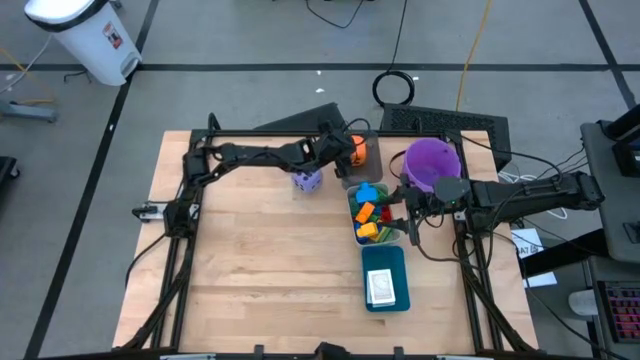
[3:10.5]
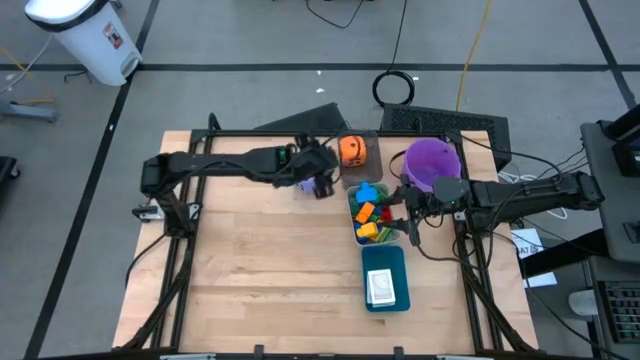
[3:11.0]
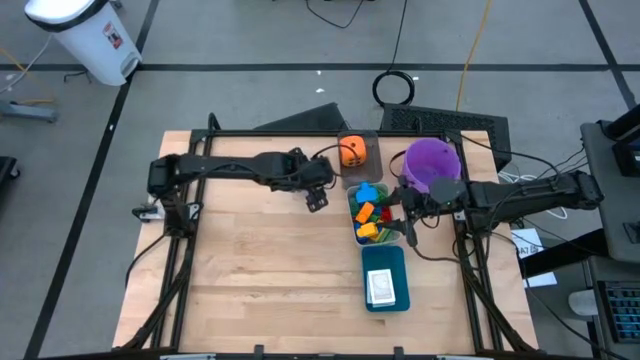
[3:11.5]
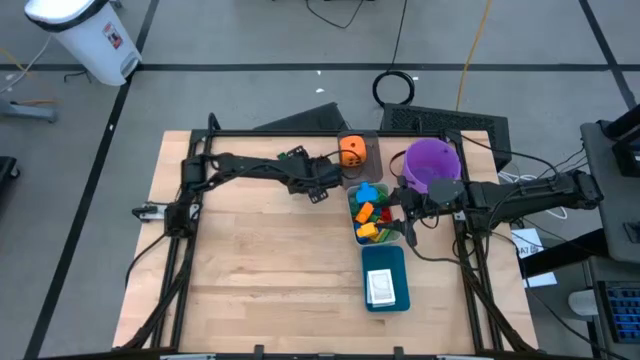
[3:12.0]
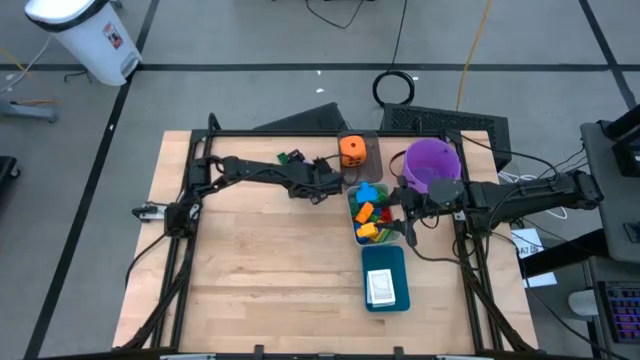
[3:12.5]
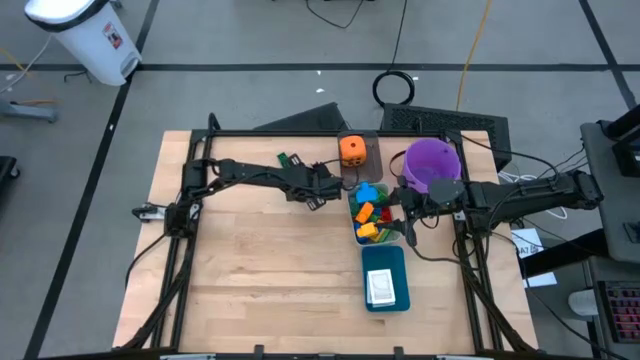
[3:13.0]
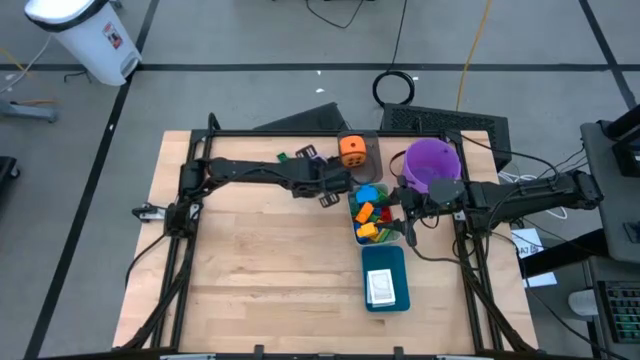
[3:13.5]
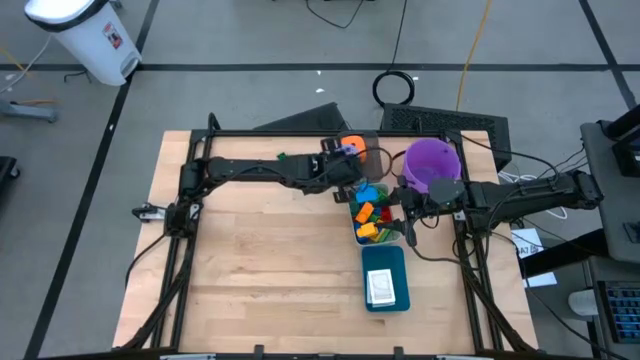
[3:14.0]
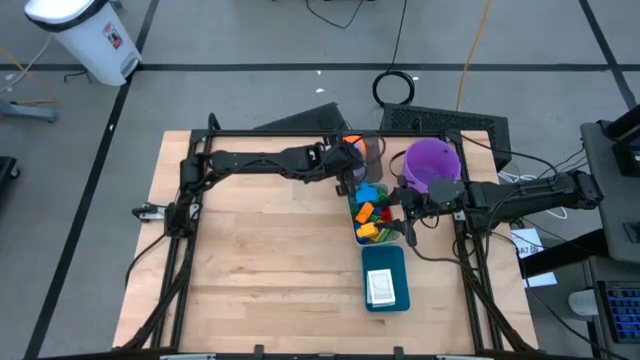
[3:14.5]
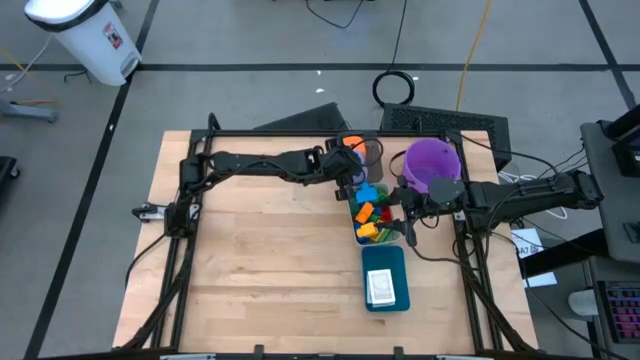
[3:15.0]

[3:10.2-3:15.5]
Task: Pick & Place Toys
Put the purple dice into the black transparent bin

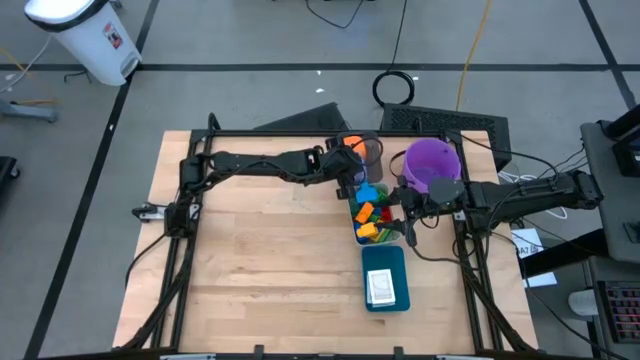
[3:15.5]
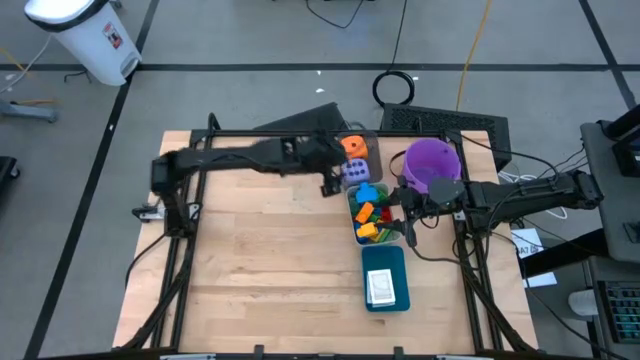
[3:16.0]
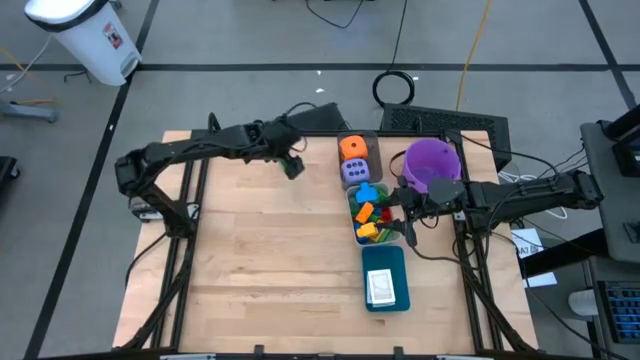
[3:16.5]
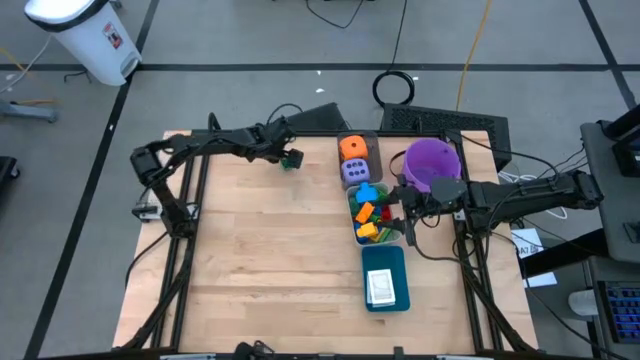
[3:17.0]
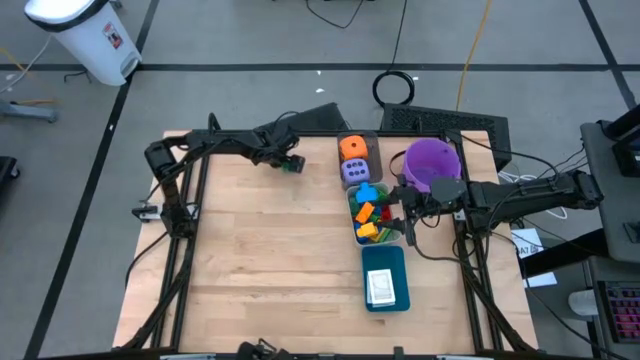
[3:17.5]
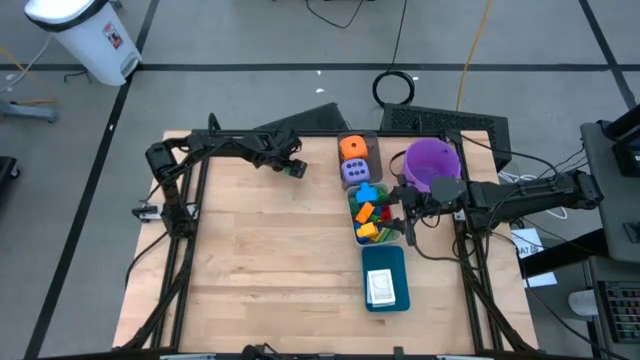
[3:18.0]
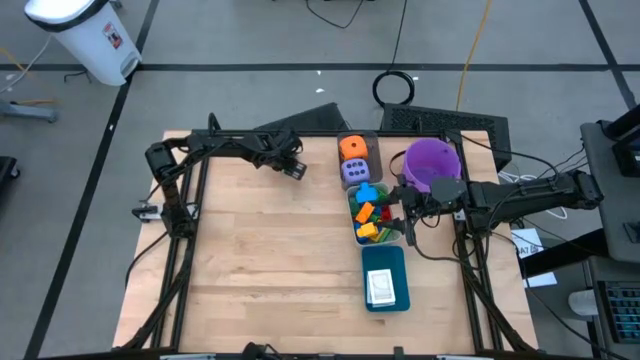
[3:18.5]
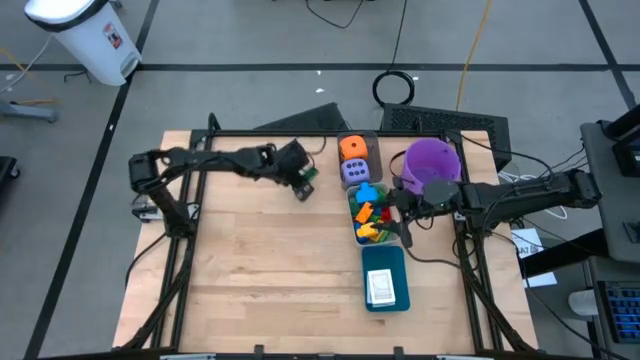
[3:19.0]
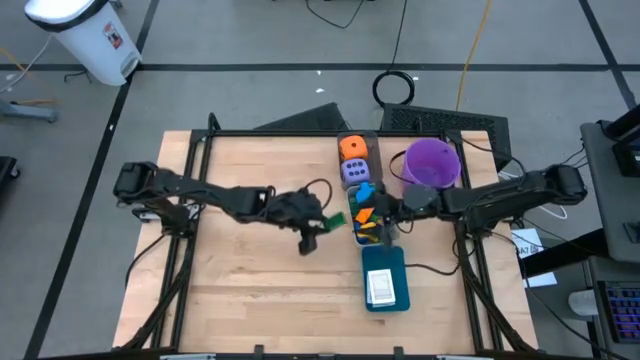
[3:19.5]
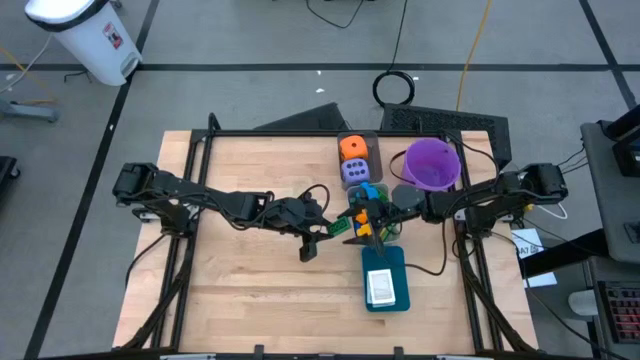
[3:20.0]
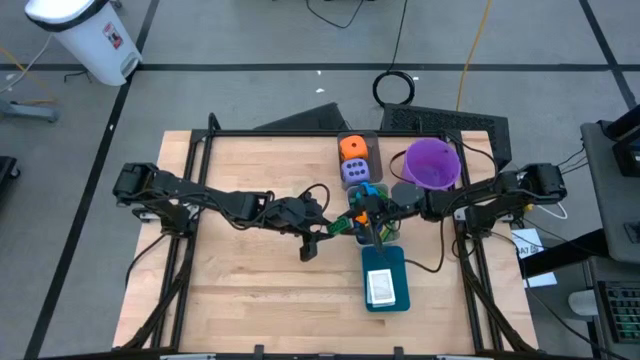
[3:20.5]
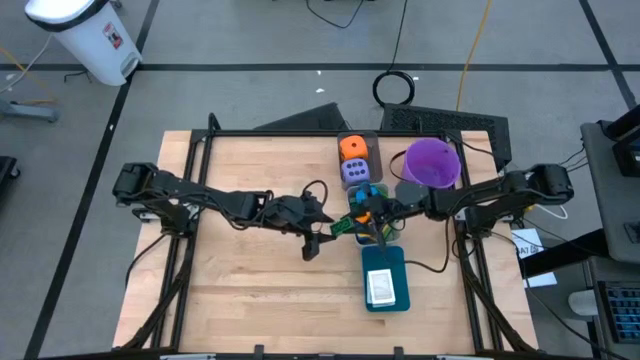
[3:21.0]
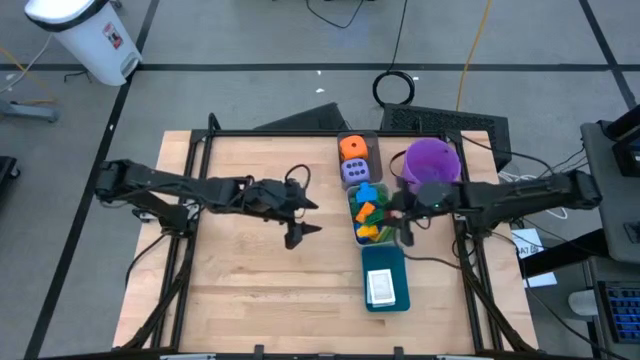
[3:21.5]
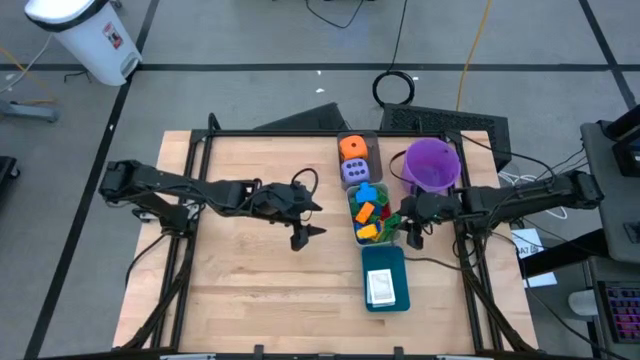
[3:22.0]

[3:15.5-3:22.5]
Put the dark green game piece into the gray bin

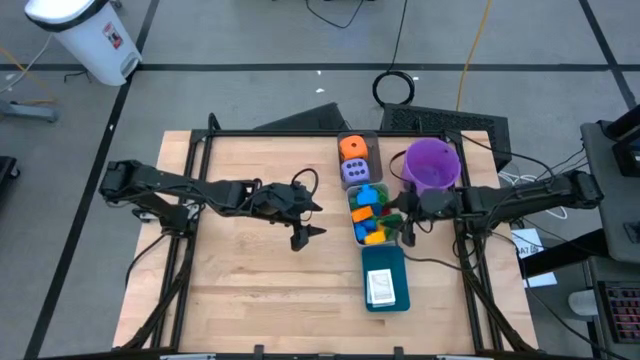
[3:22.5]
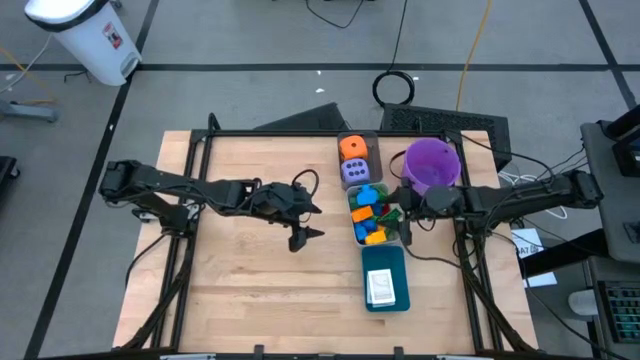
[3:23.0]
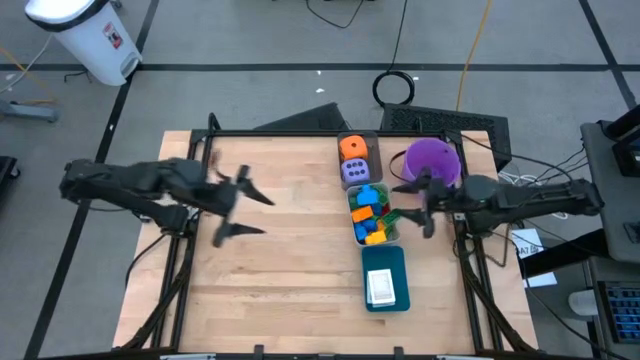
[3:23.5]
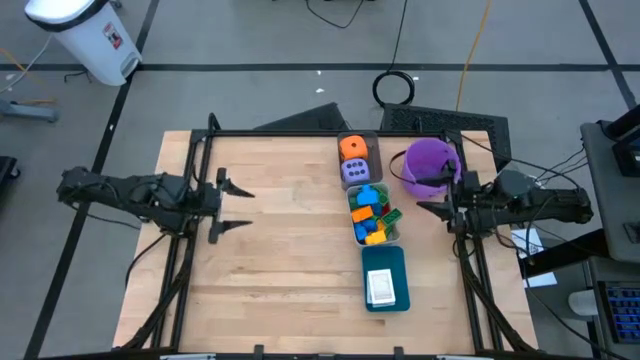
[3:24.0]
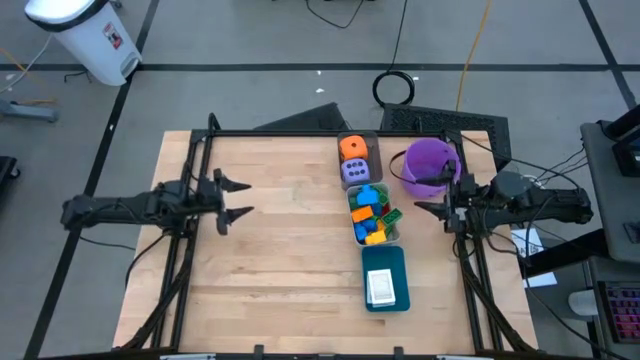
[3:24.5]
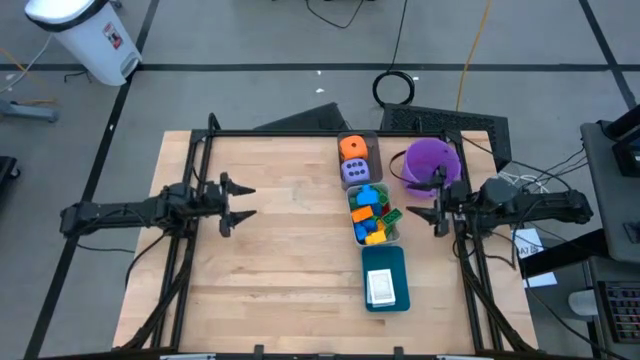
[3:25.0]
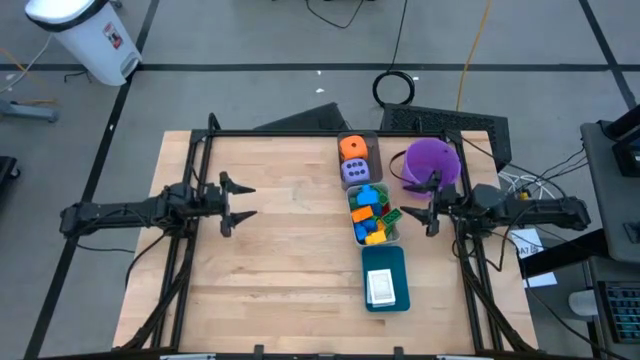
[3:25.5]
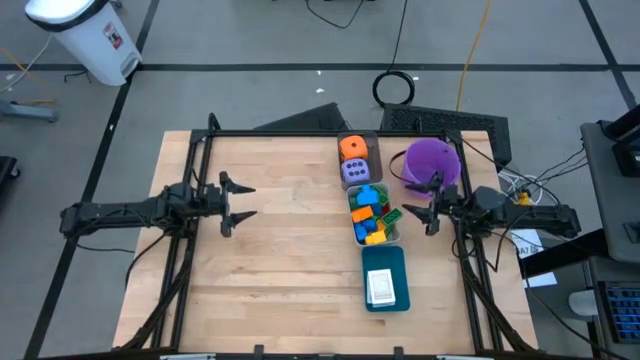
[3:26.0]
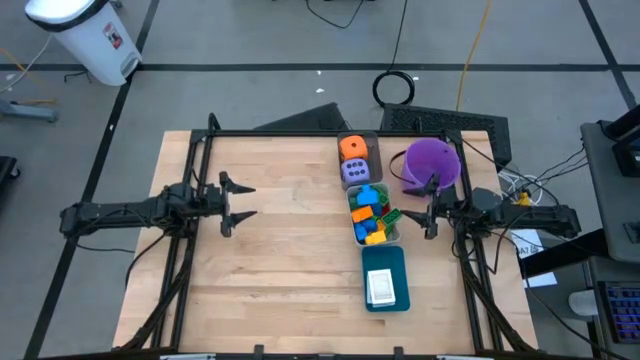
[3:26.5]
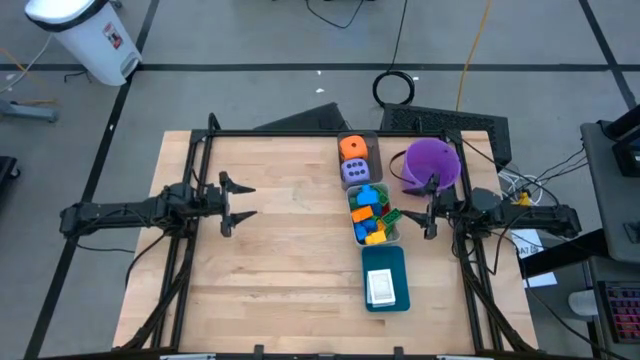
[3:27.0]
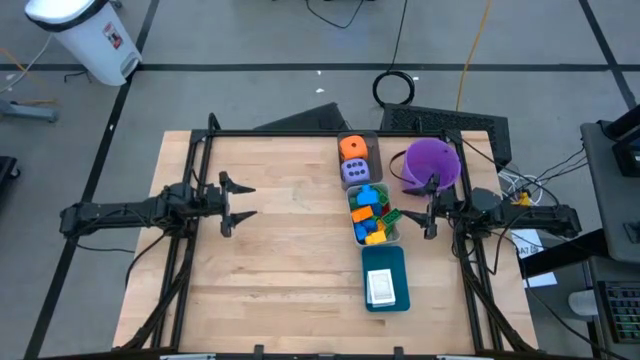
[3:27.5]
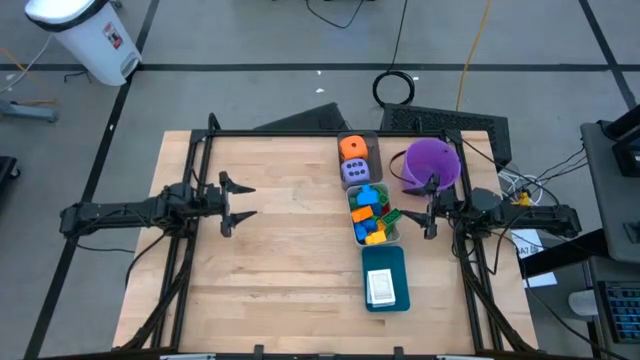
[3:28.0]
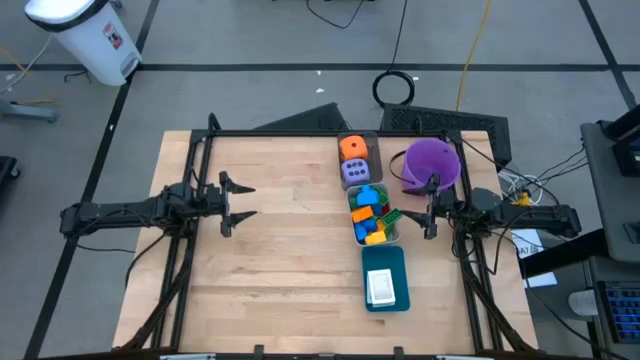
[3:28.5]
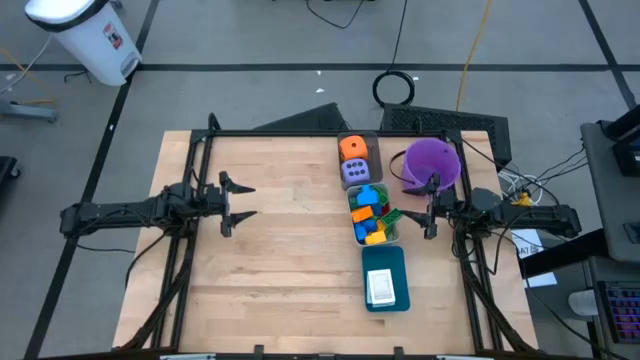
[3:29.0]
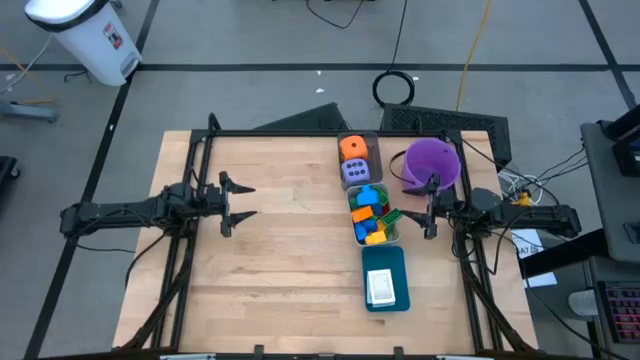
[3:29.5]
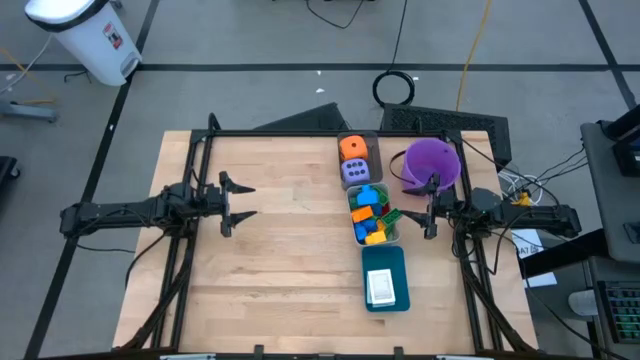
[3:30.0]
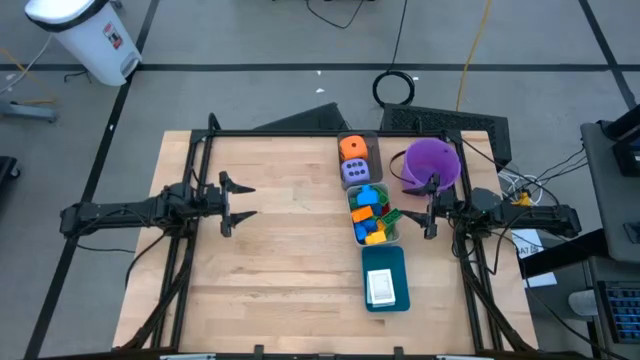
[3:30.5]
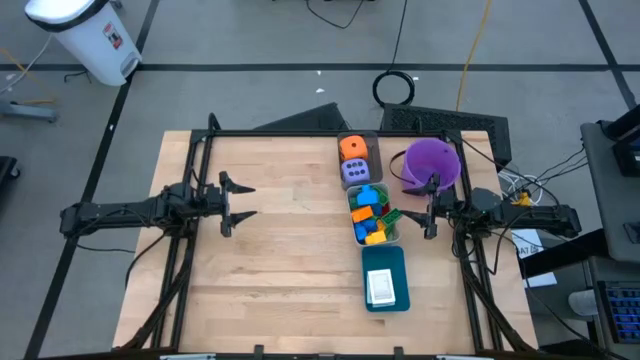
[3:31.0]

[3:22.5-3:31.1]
Return to home position
